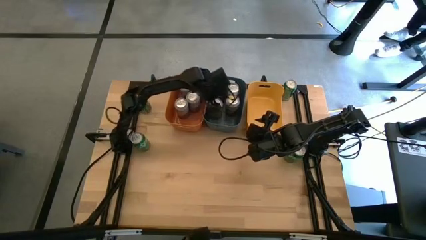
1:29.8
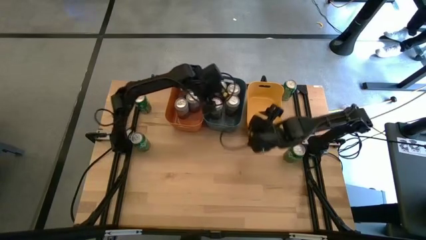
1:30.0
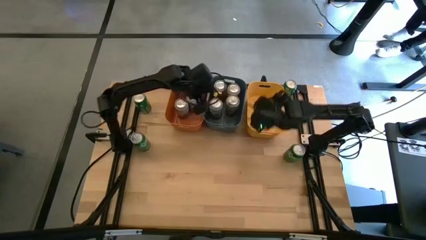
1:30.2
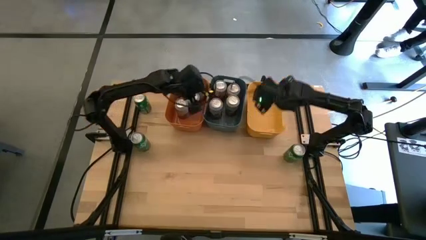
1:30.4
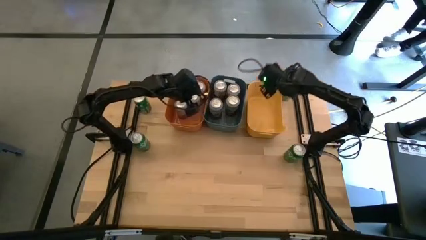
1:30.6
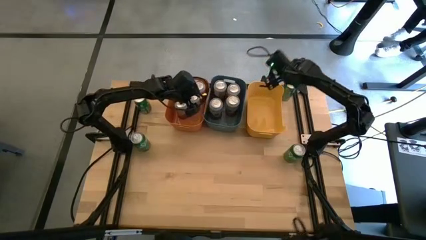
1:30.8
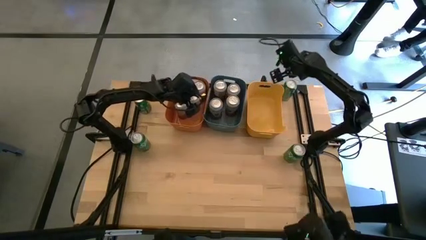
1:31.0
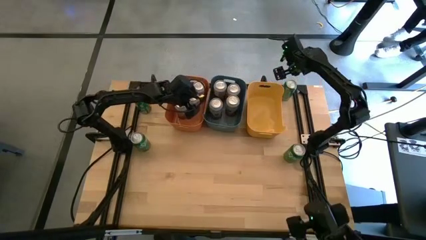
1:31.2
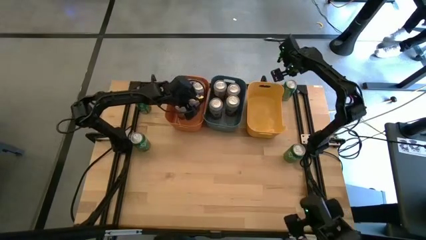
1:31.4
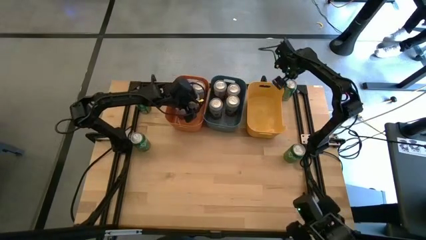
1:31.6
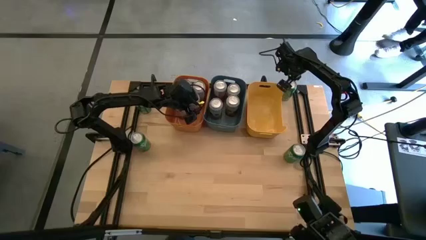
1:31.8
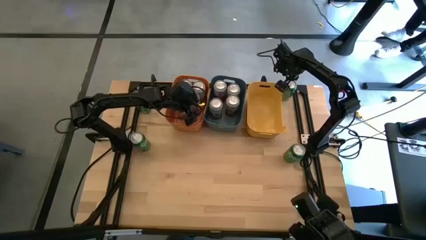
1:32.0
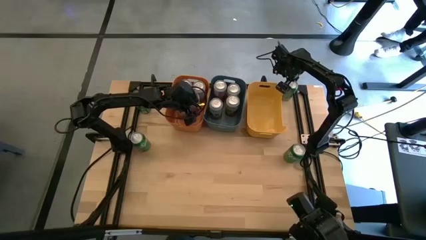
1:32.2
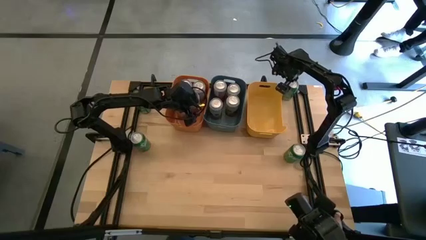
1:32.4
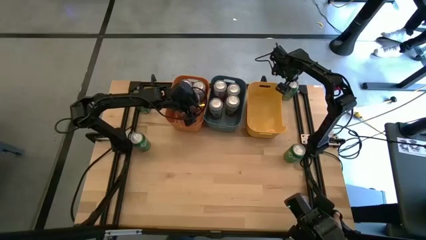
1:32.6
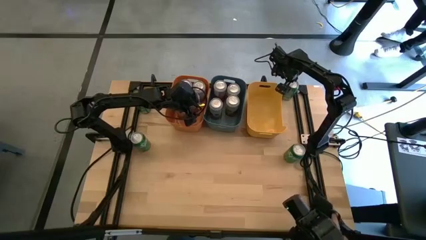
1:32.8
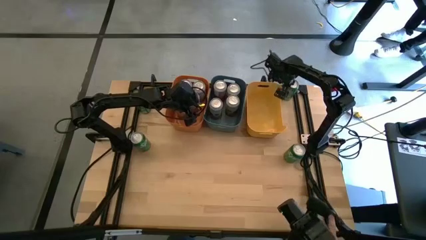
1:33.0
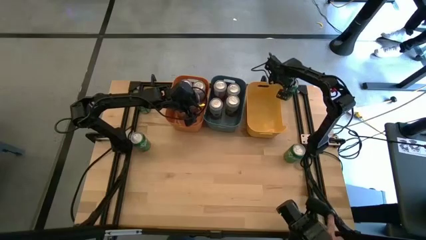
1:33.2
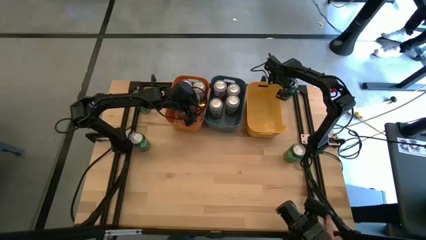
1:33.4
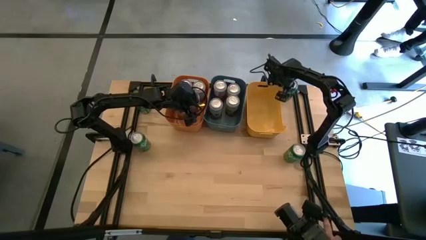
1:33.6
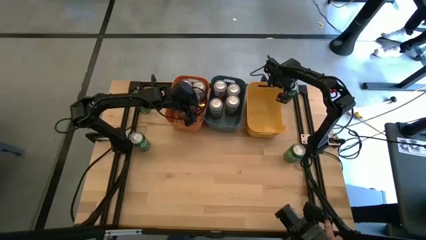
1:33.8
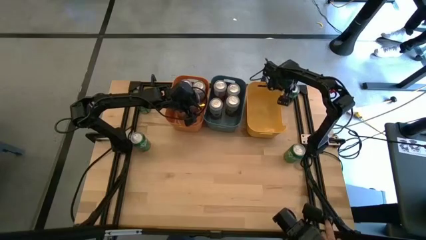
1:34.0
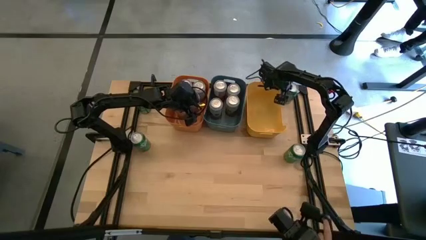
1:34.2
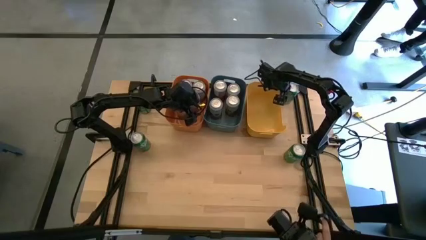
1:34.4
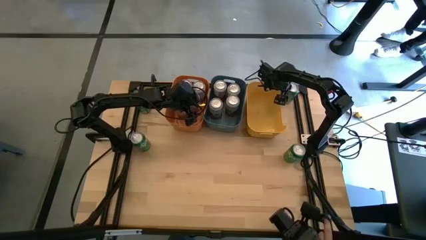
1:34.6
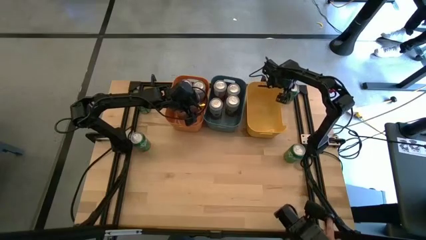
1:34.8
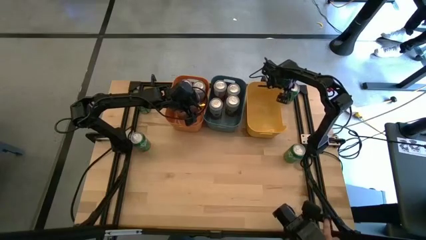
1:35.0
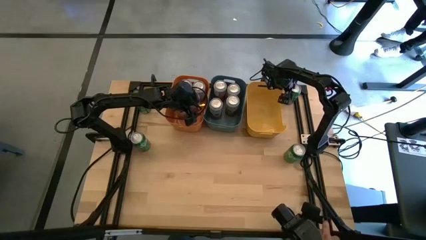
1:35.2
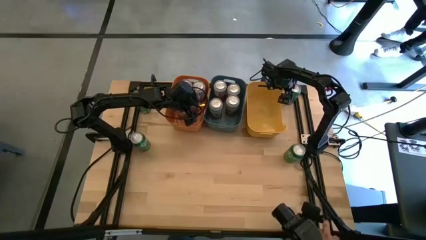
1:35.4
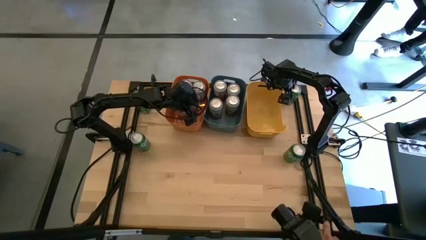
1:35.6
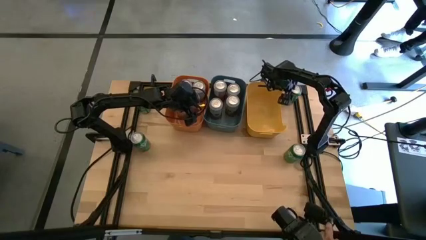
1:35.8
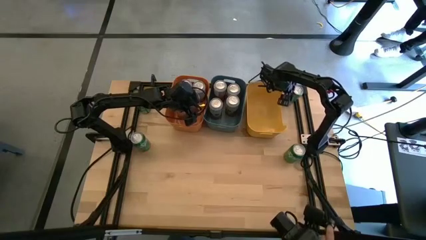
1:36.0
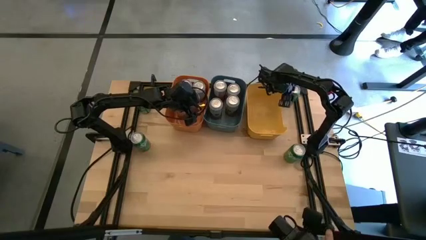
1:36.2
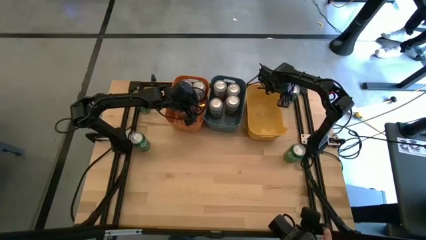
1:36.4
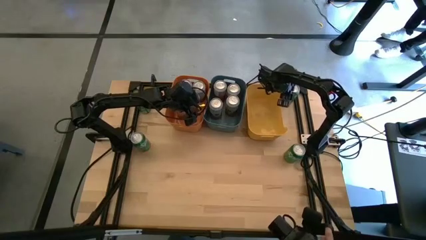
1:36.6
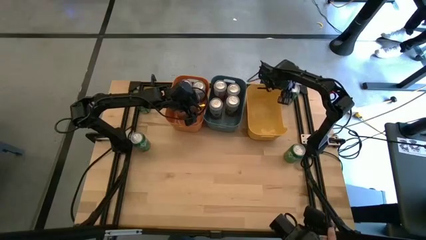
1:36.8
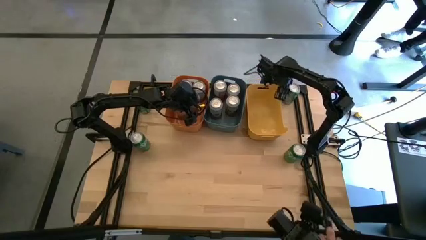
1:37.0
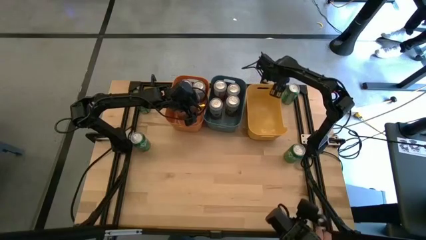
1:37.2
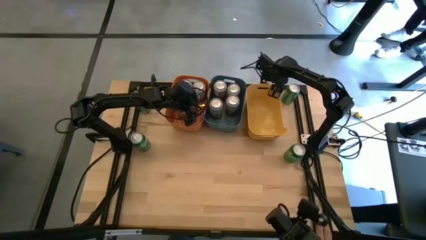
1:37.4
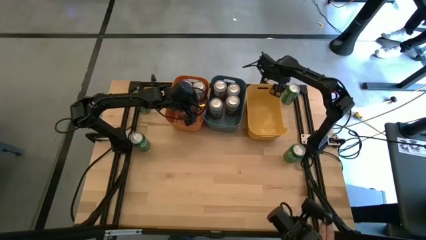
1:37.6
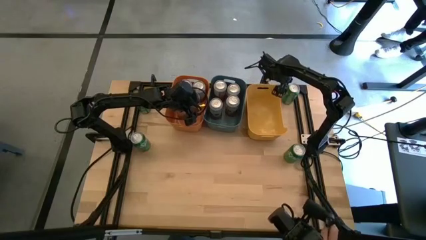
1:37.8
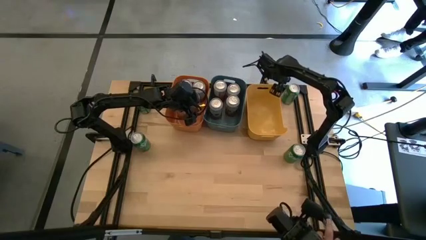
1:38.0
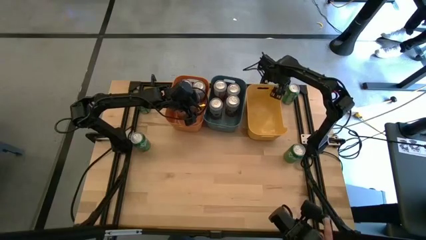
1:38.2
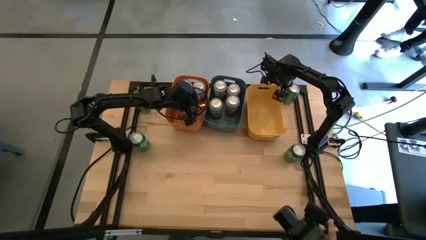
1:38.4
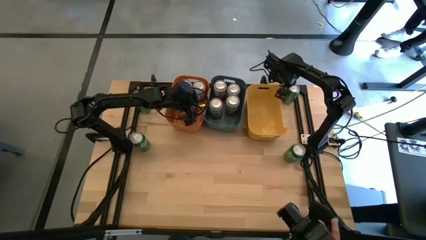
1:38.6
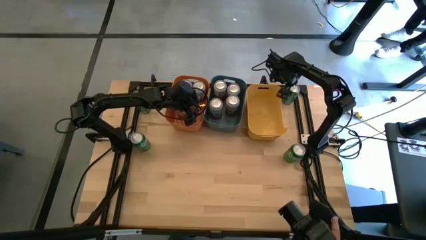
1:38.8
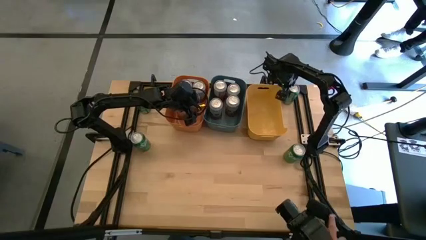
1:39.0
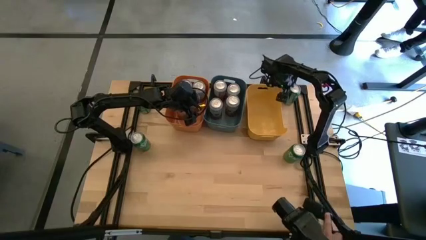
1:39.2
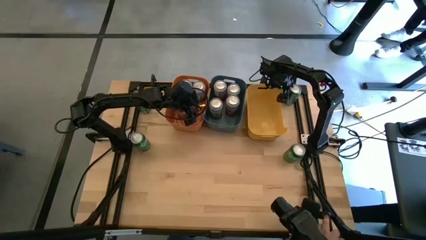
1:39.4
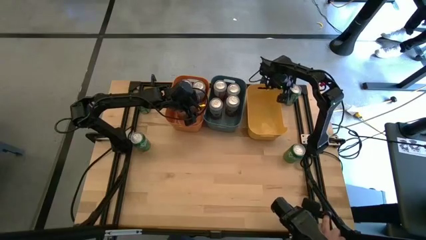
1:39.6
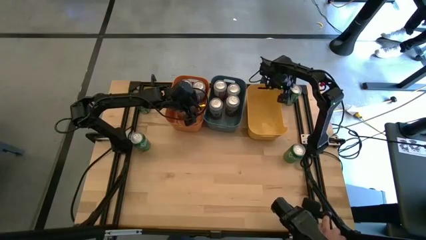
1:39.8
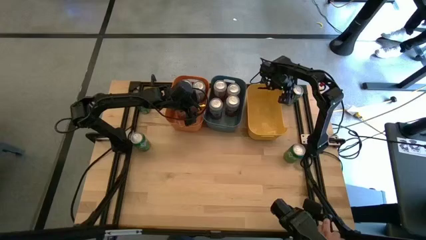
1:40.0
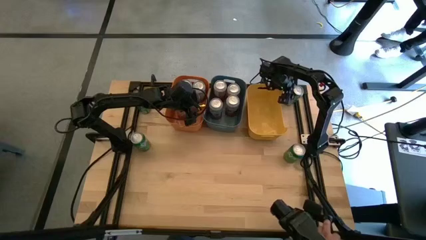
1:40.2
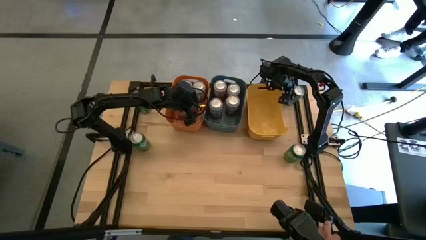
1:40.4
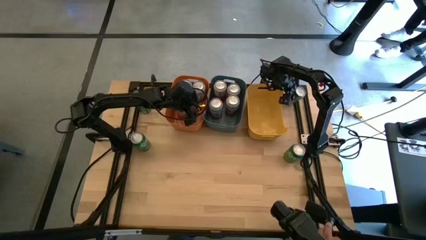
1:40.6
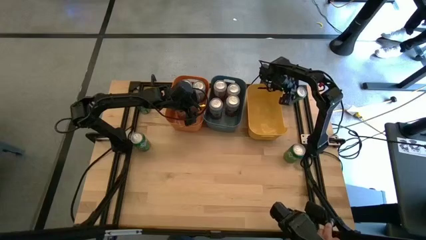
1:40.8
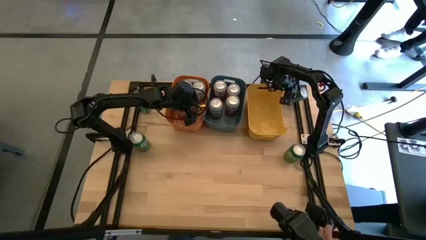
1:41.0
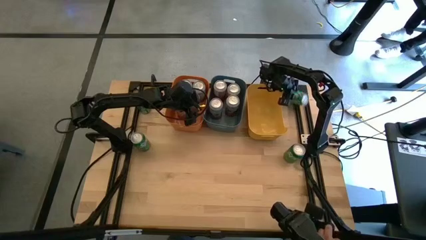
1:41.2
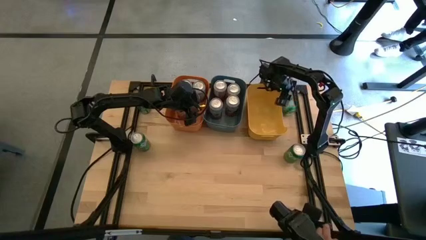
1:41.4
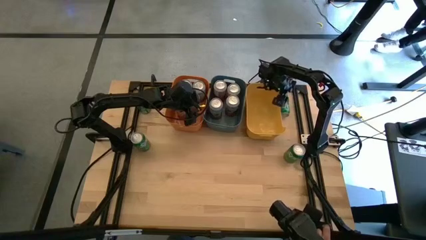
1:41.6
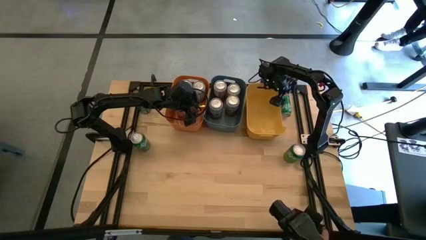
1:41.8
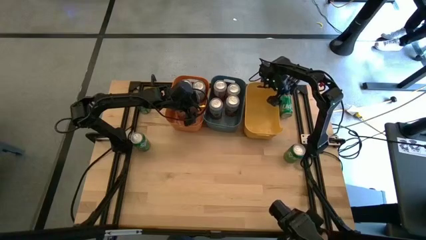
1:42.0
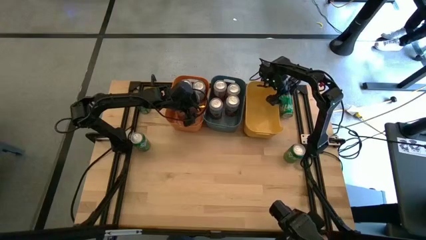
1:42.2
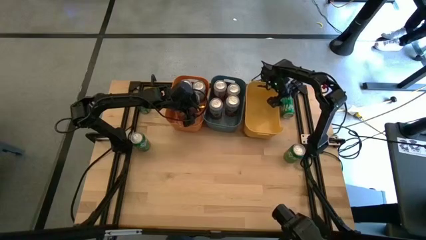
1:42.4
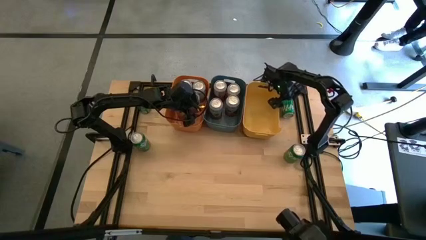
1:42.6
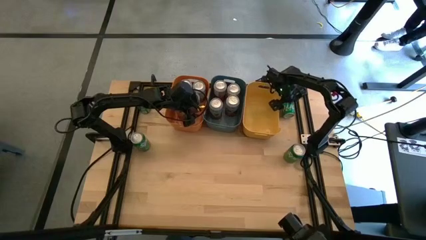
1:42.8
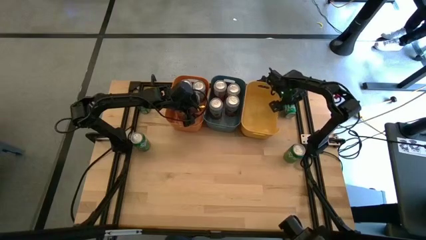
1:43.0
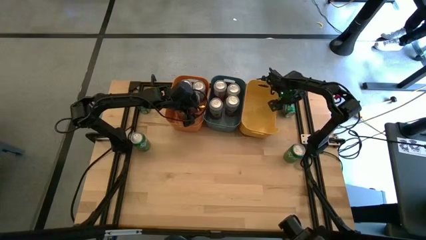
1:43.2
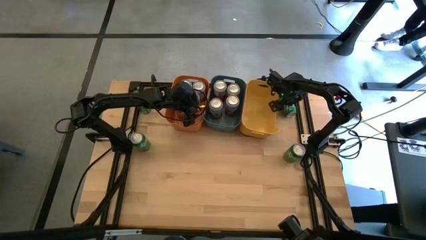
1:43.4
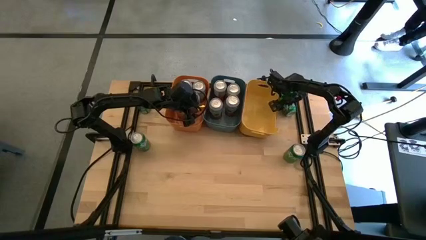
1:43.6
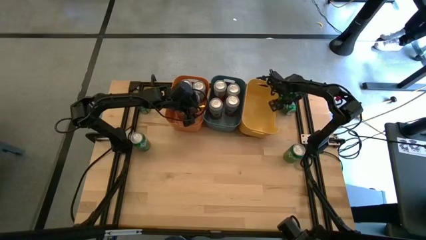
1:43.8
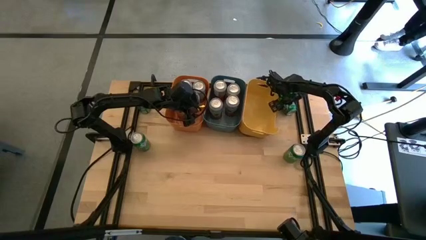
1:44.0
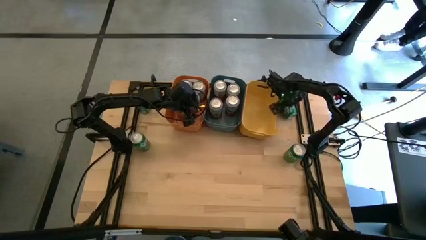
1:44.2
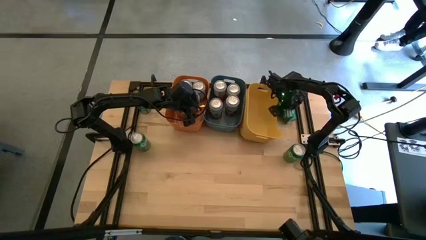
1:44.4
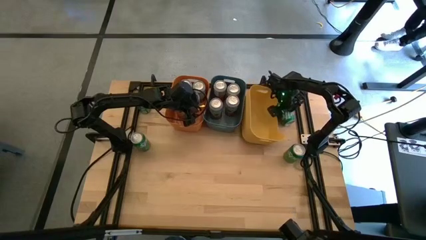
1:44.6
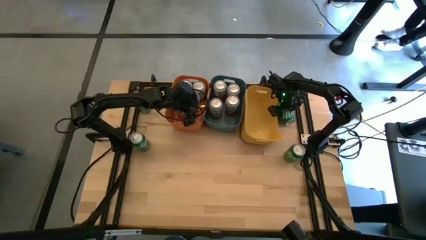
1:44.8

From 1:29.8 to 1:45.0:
Task: Sort soda cans
Put the top right green soda can into the yellow bin
